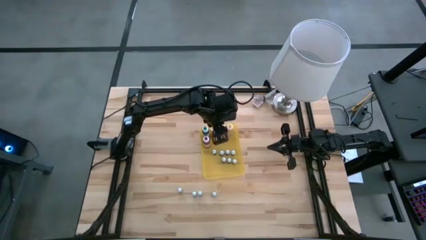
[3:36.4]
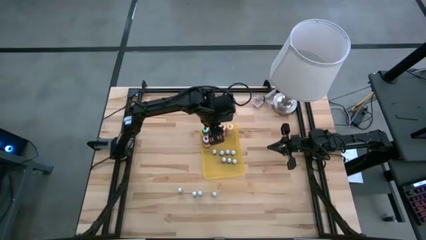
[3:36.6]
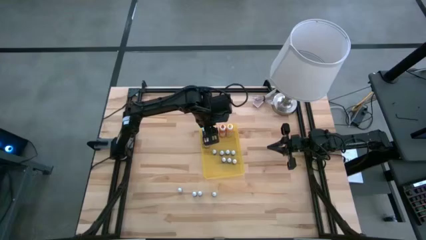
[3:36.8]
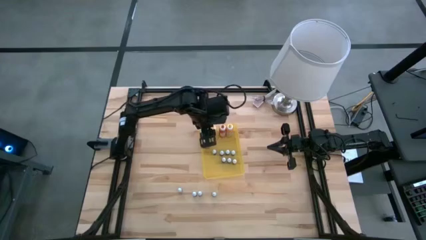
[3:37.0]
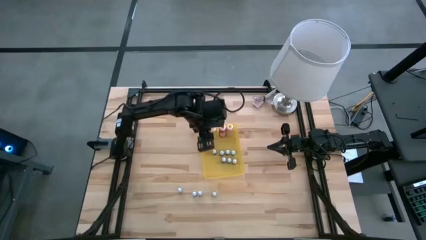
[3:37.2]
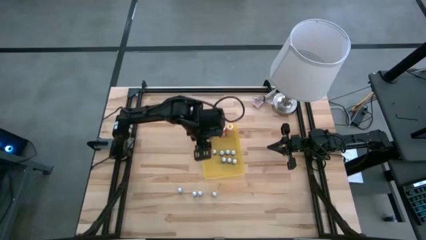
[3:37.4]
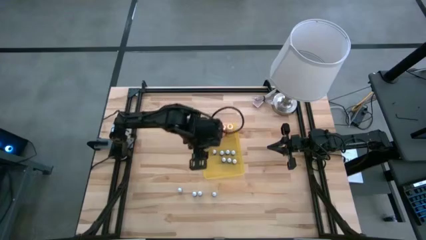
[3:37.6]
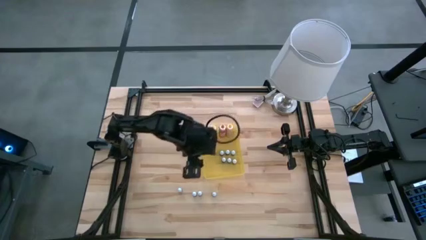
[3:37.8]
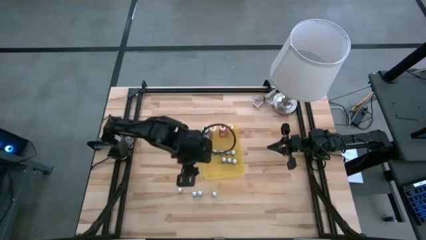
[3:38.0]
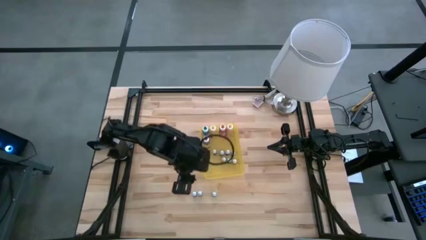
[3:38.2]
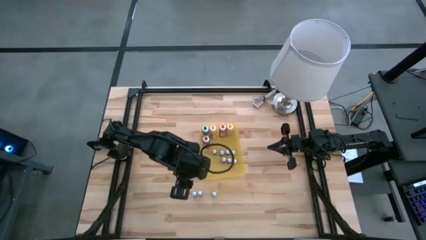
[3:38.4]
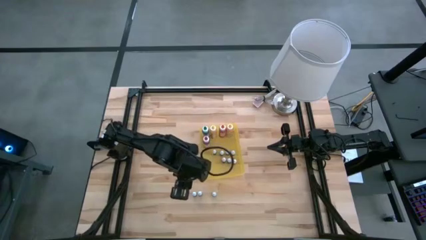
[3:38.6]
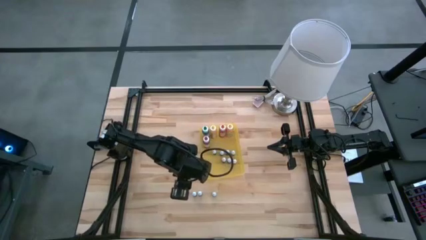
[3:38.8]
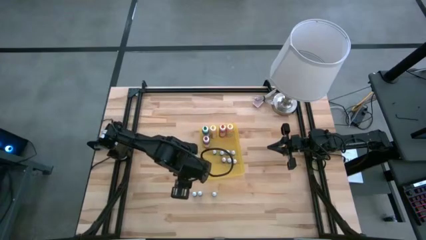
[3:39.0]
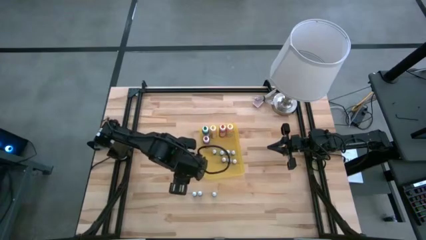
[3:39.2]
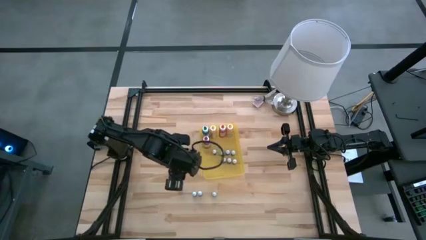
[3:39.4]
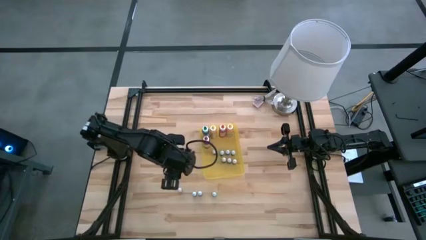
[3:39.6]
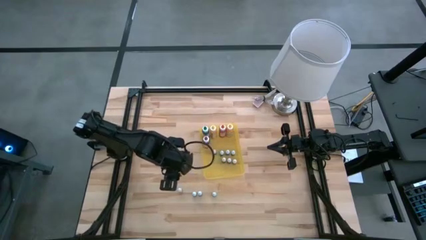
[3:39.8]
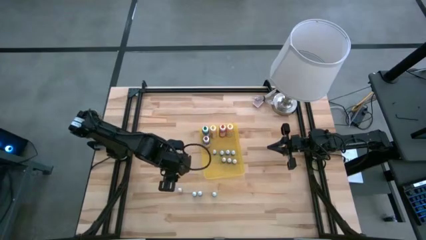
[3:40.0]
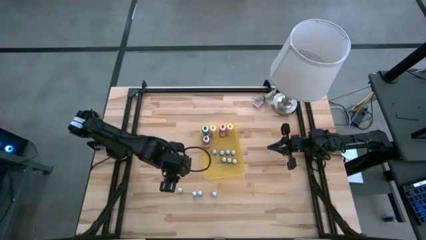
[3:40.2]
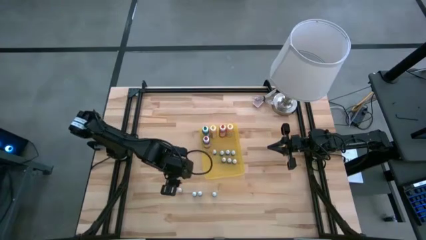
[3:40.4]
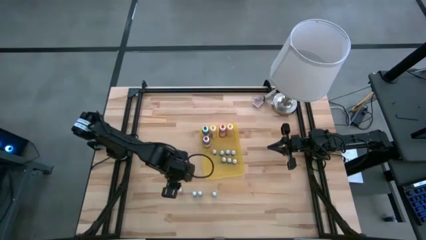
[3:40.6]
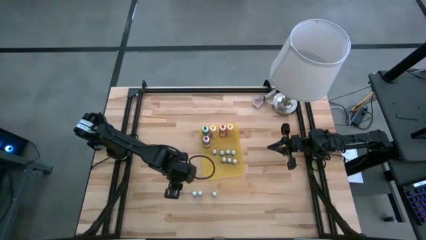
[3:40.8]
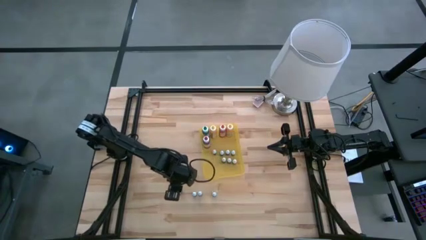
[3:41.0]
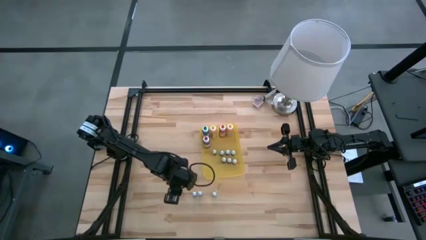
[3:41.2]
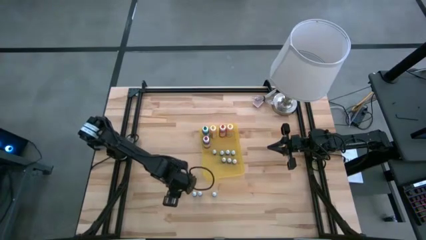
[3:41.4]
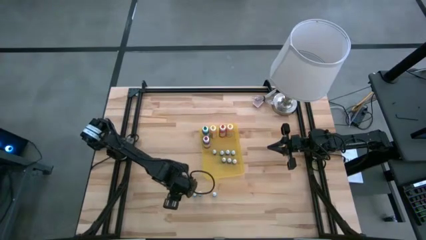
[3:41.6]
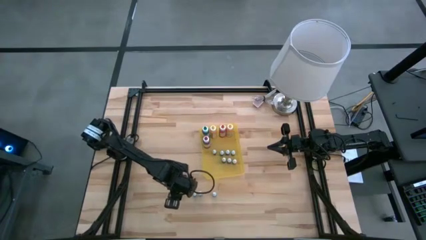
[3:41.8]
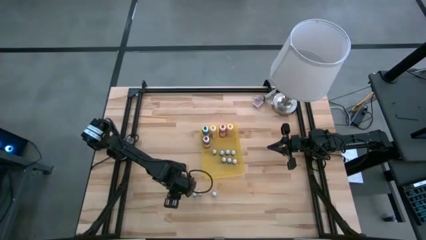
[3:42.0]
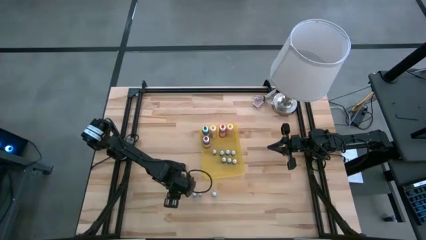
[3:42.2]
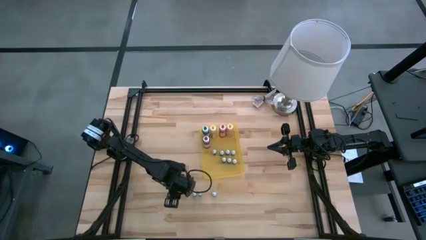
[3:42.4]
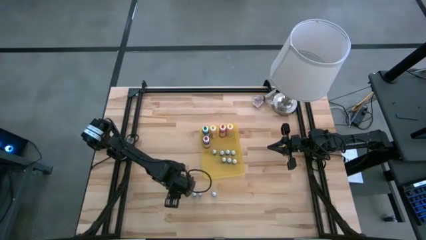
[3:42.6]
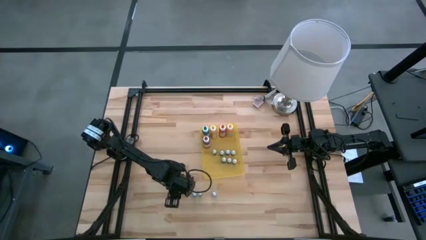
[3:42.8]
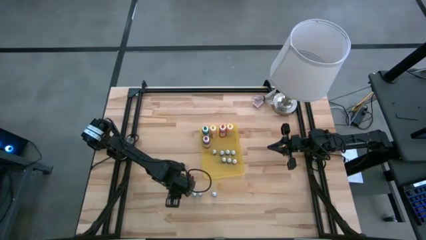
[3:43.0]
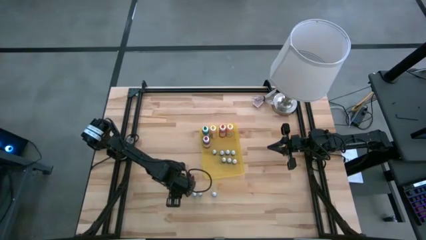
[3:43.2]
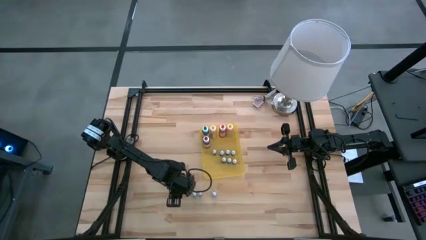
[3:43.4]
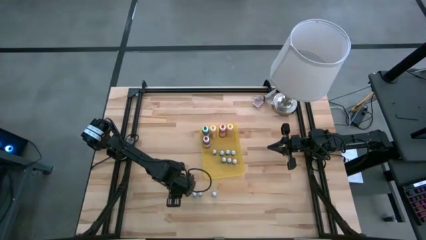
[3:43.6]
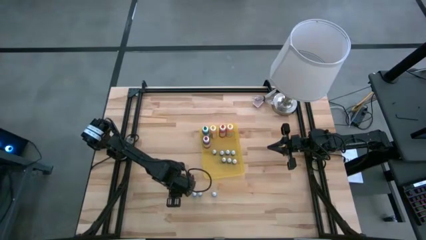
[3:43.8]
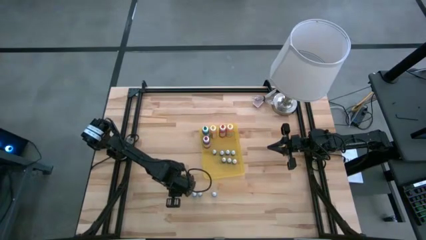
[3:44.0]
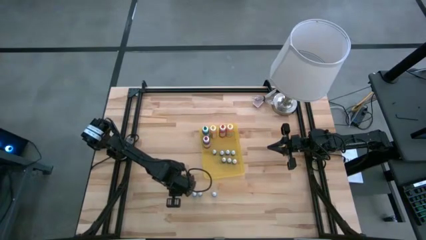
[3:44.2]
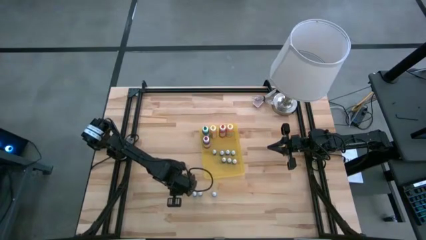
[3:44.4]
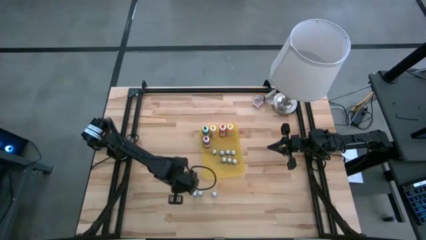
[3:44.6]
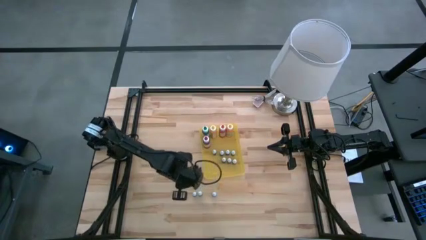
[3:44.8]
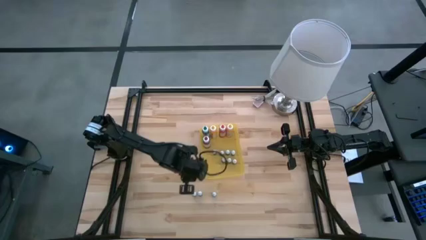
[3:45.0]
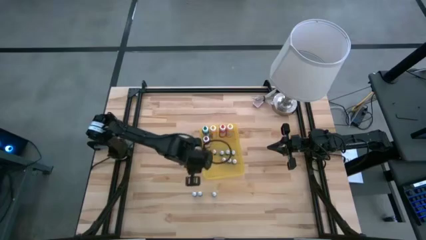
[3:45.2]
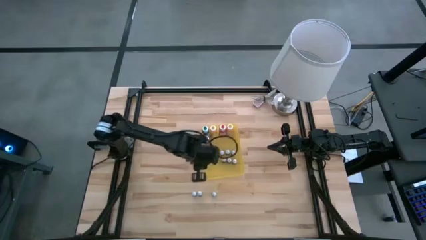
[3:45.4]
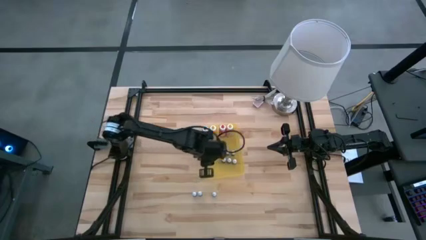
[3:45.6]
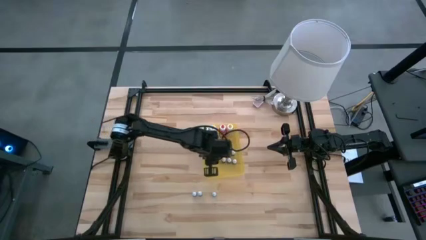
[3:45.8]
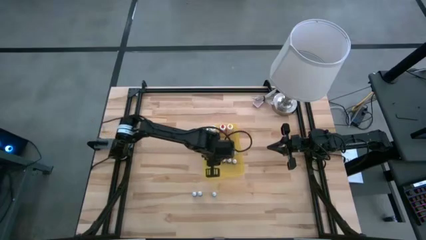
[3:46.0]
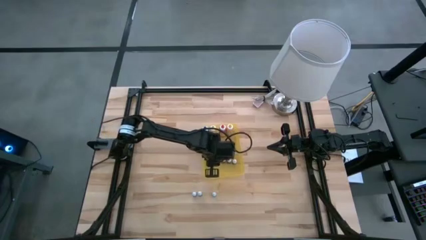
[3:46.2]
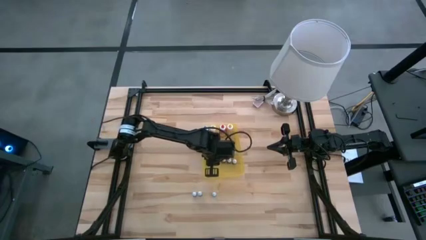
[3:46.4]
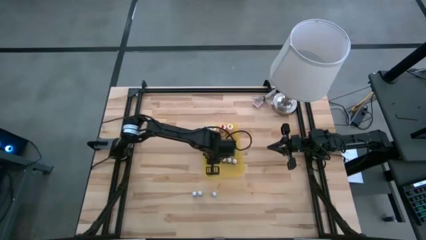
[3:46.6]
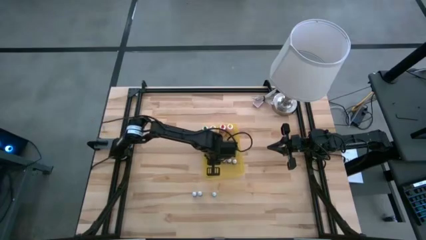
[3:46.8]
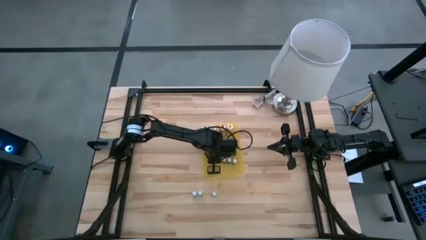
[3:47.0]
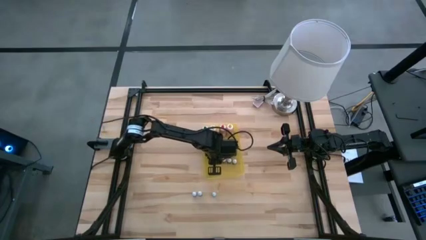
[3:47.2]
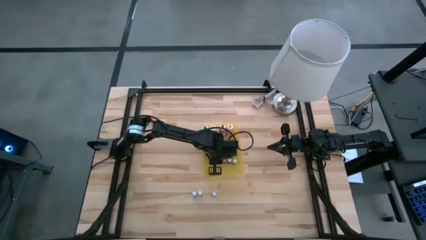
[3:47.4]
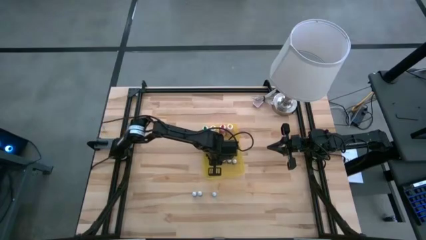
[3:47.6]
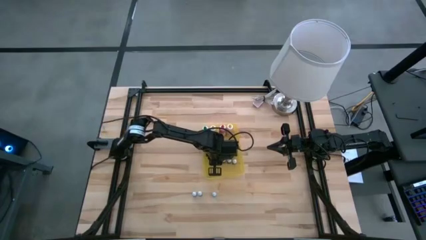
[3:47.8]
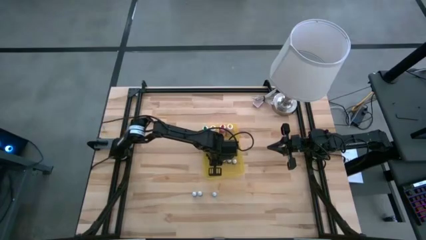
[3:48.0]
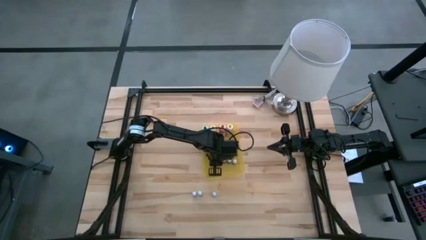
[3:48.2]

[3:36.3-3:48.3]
Task: Pick & Place food coloring
Put the small black food coloring bottle into the bin

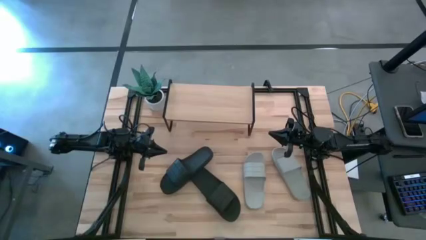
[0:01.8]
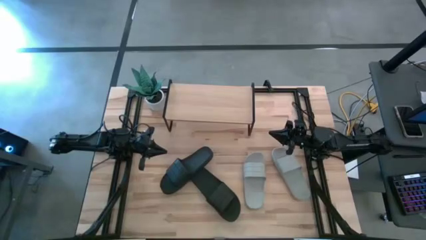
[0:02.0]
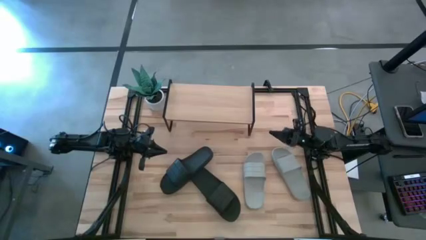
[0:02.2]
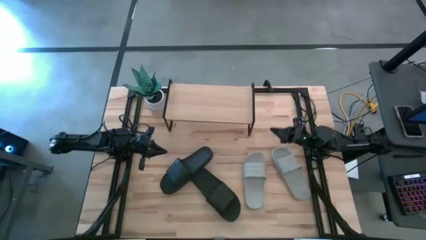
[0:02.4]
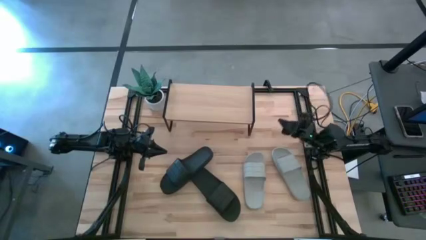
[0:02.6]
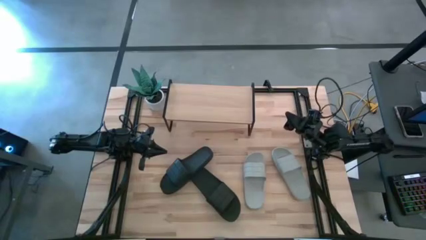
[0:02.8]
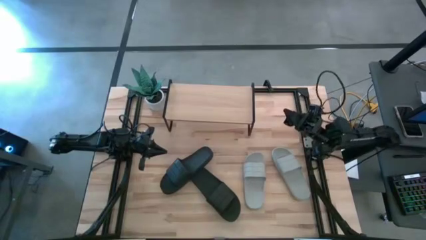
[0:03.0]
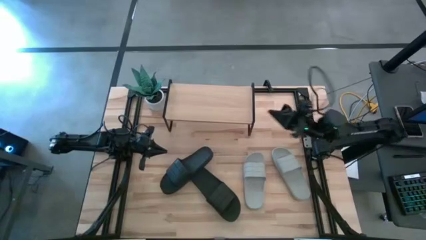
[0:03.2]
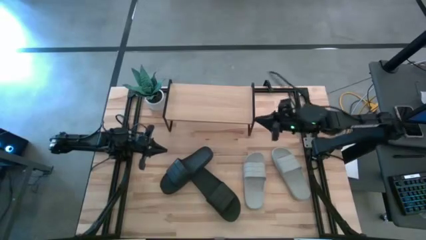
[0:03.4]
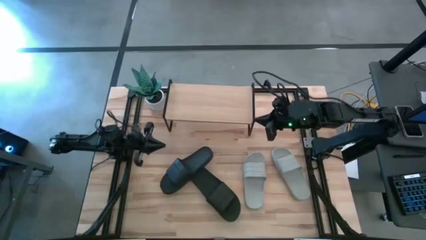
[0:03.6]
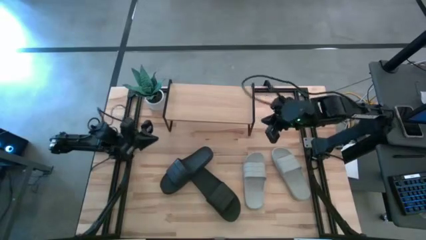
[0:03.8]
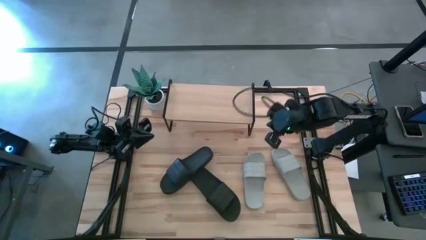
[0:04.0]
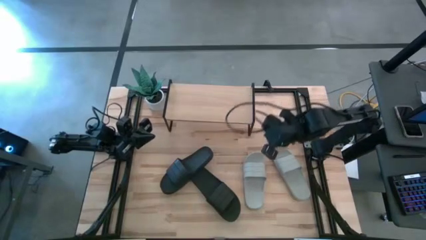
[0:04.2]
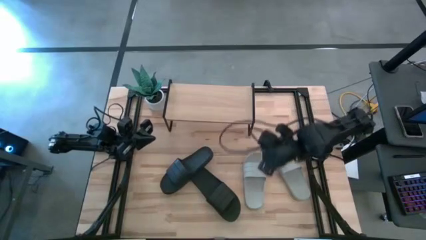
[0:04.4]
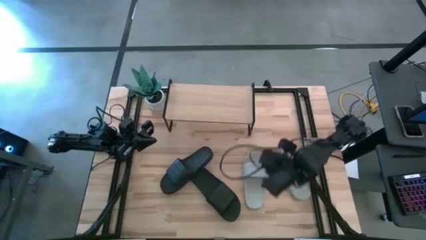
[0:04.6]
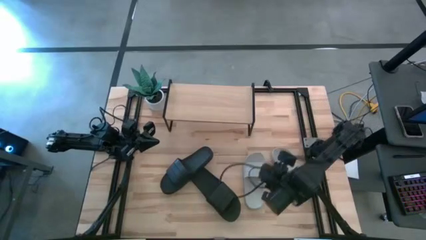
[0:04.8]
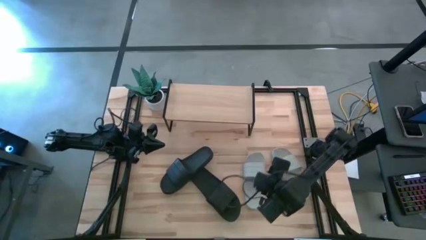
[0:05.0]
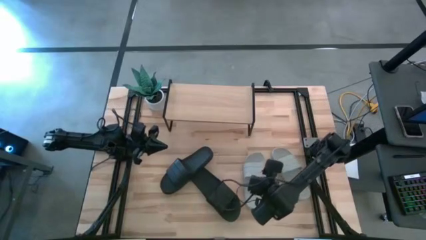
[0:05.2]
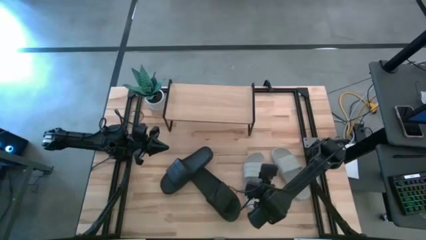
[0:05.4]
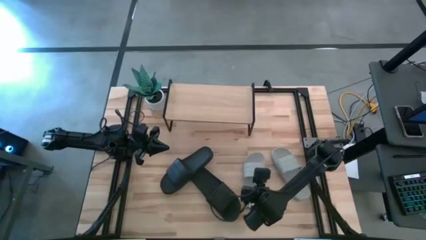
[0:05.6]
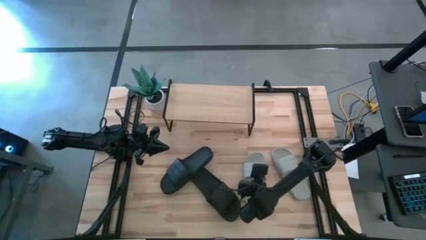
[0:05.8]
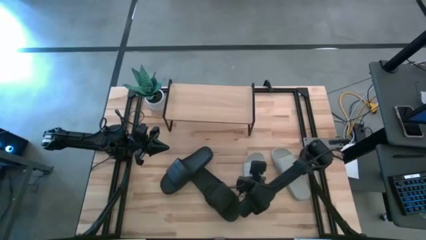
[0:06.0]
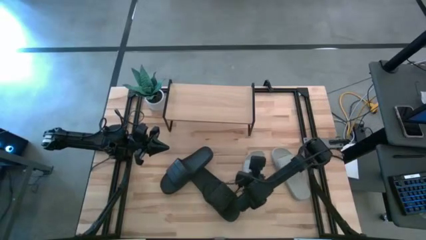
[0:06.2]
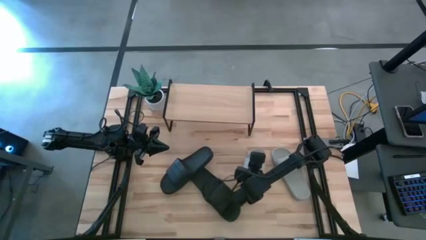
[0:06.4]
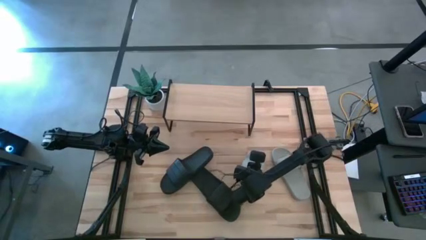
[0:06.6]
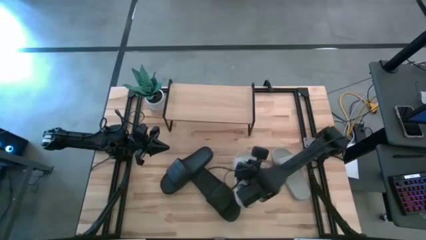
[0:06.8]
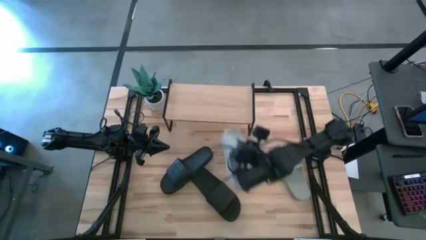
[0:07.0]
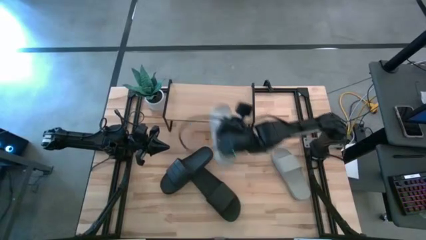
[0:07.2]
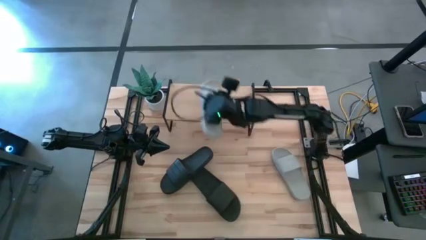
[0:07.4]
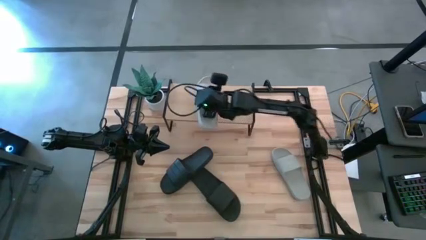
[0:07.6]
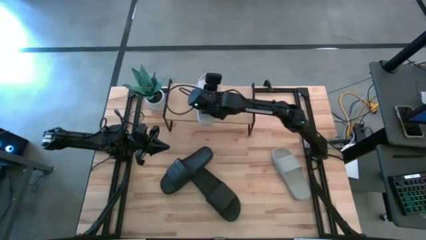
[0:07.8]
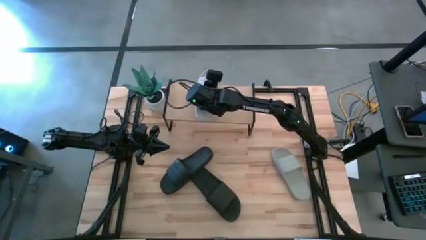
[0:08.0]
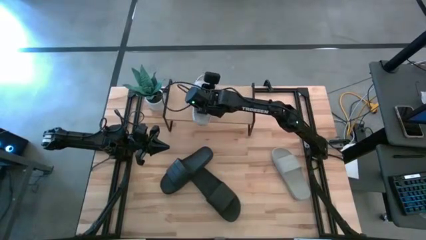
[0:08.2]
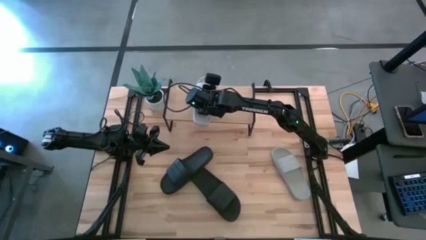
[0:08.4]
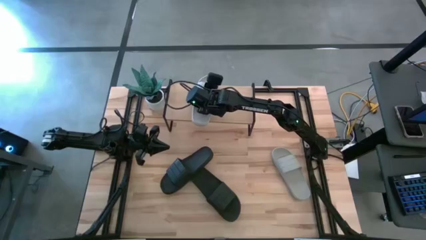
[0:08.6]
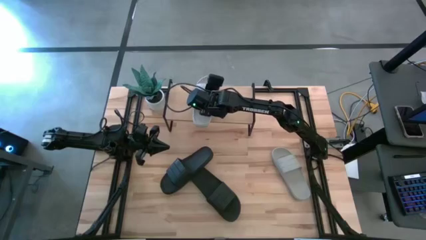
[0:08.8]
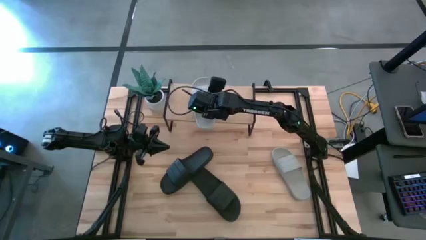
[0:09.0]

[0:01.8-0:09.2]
Task: Pick and place slides into the shelf
Put the left gray slide on the shelf
